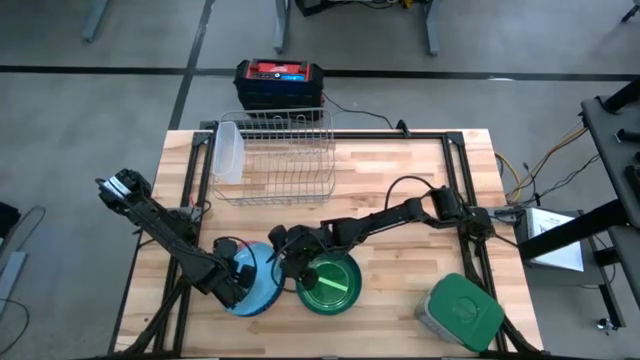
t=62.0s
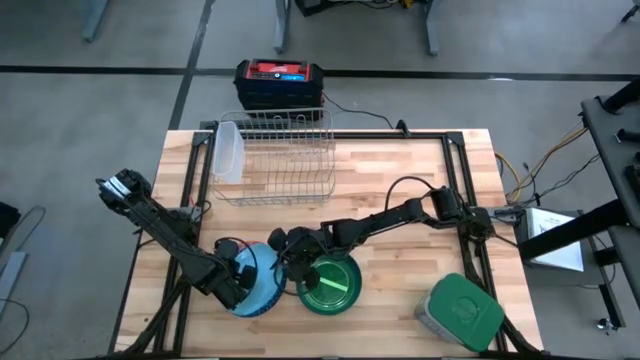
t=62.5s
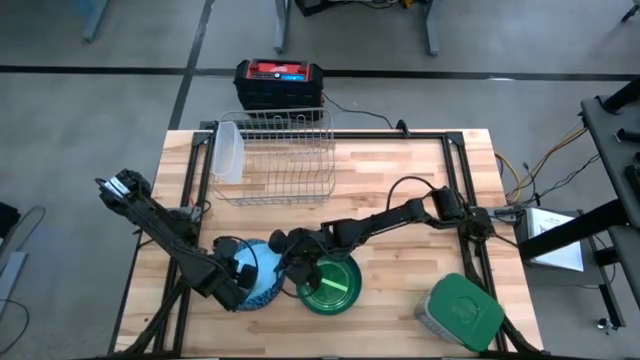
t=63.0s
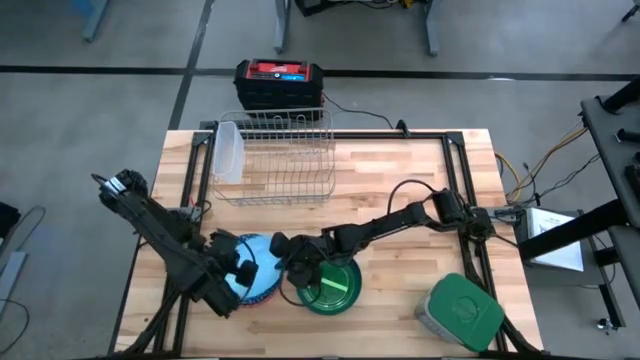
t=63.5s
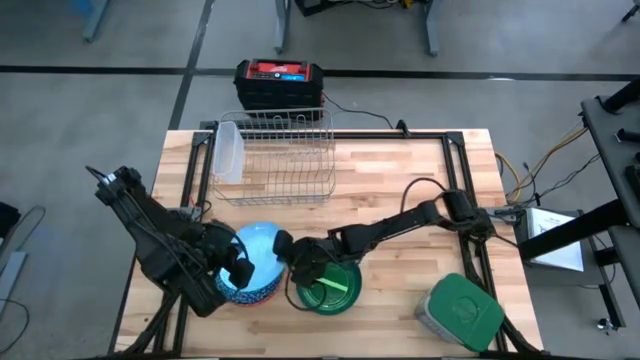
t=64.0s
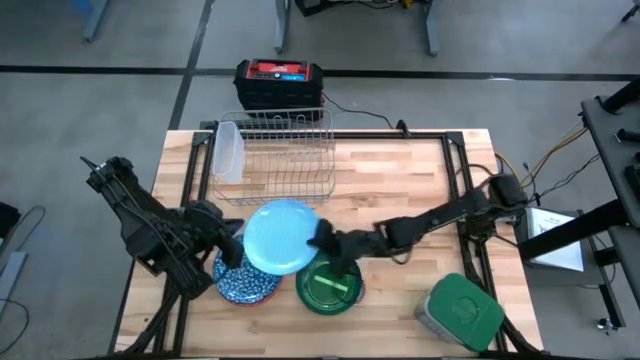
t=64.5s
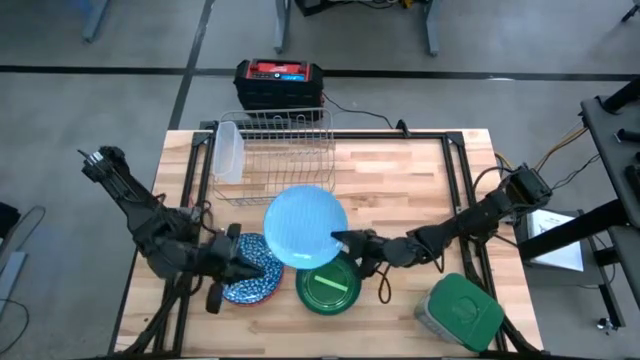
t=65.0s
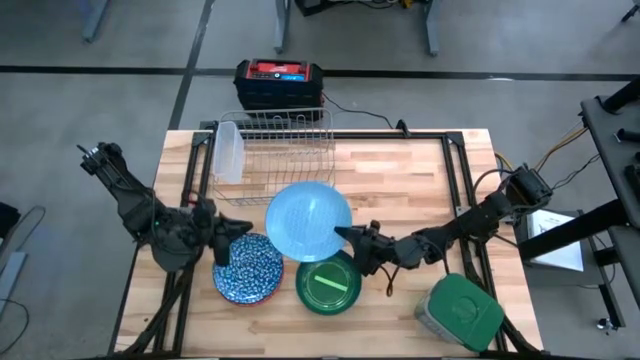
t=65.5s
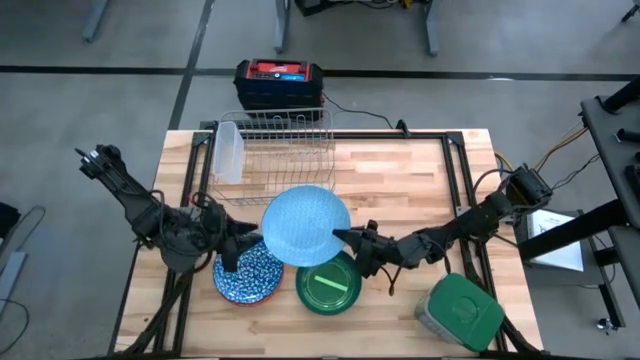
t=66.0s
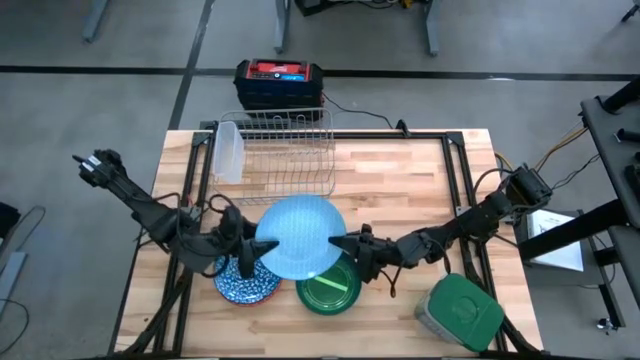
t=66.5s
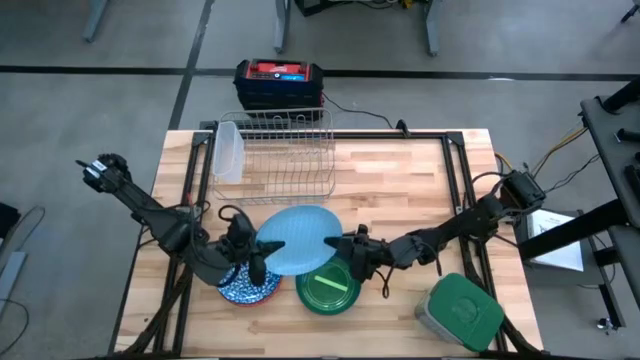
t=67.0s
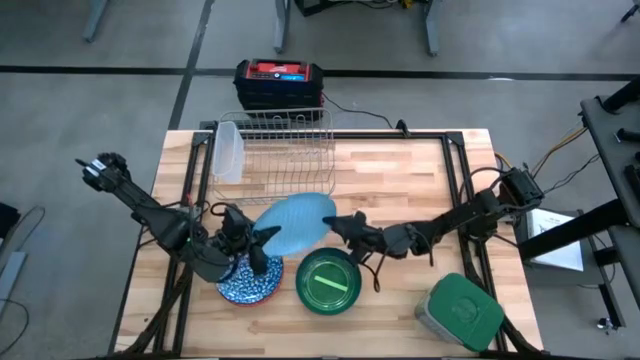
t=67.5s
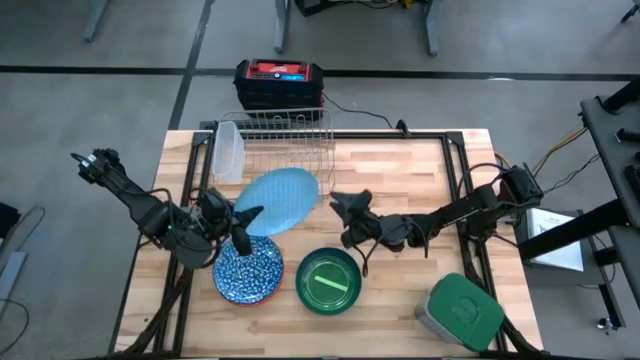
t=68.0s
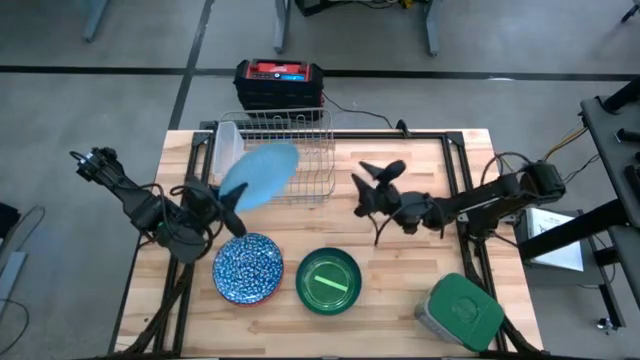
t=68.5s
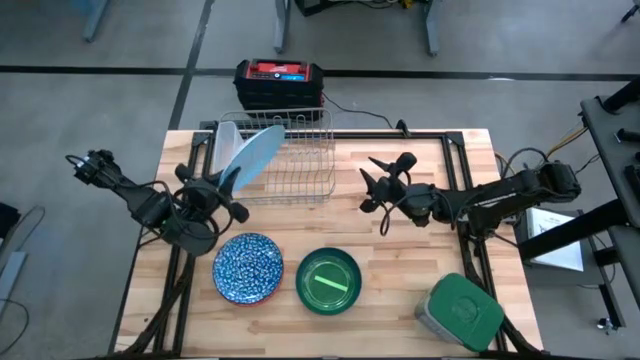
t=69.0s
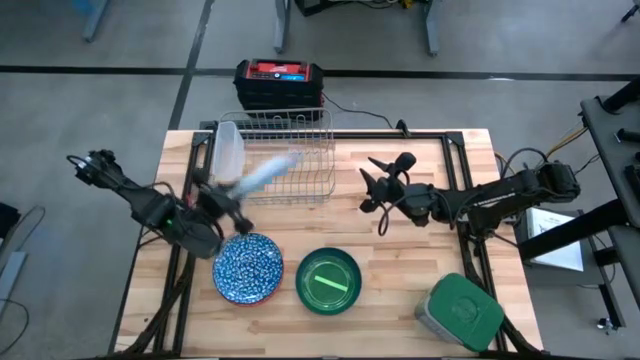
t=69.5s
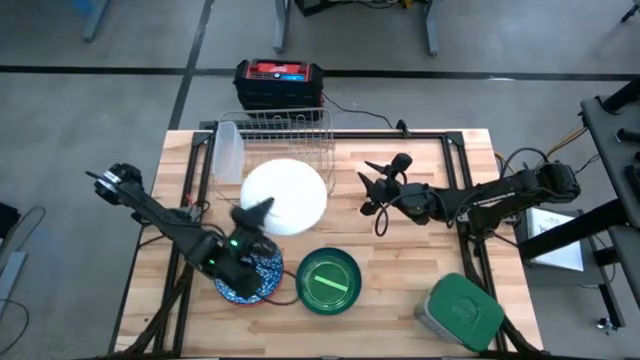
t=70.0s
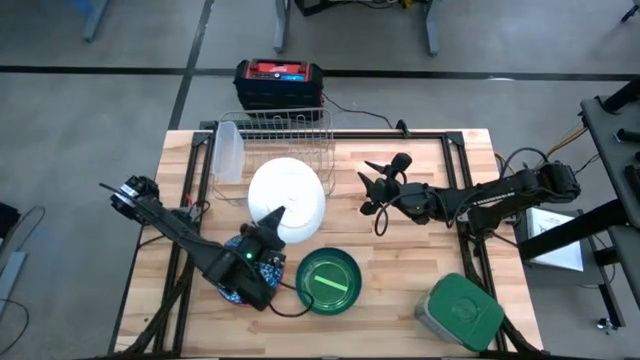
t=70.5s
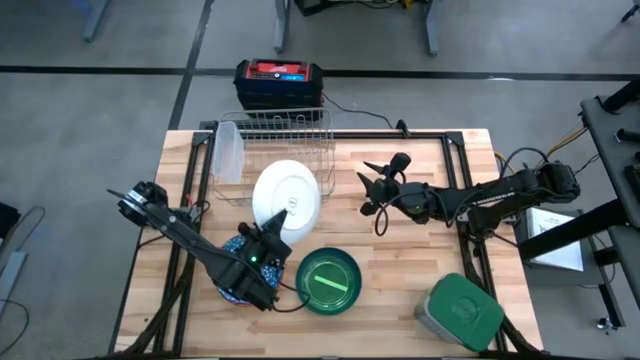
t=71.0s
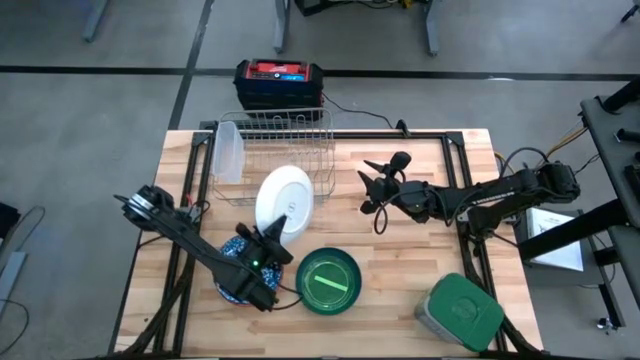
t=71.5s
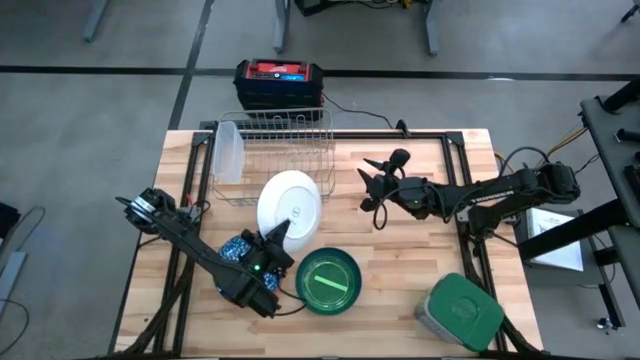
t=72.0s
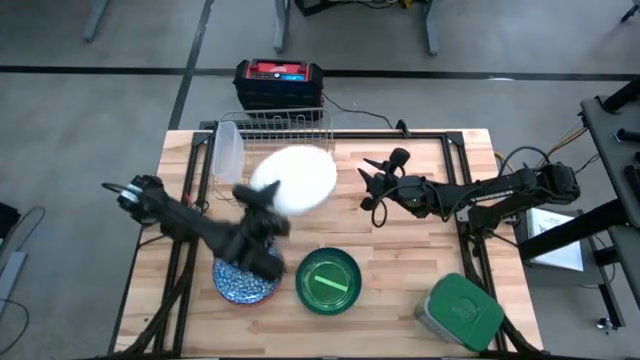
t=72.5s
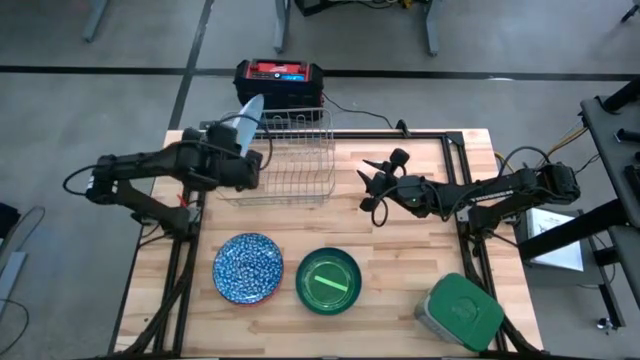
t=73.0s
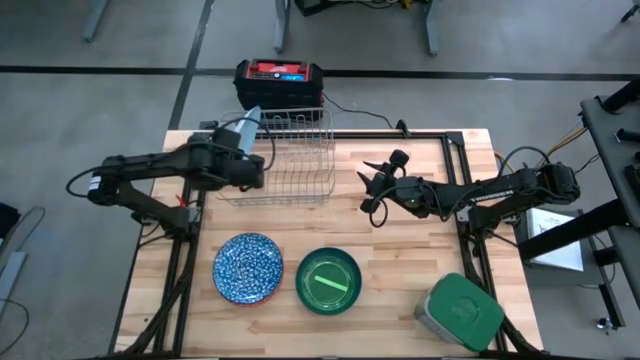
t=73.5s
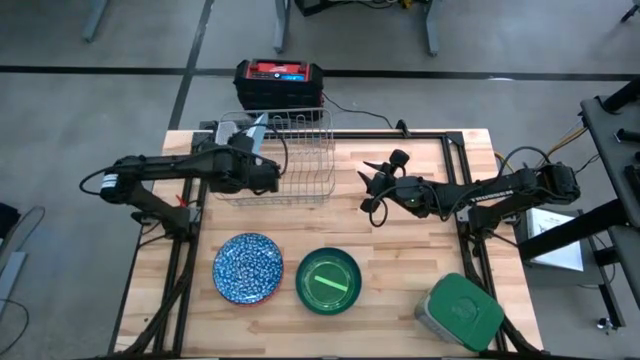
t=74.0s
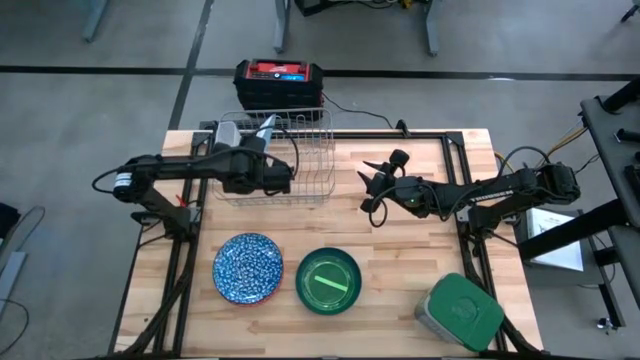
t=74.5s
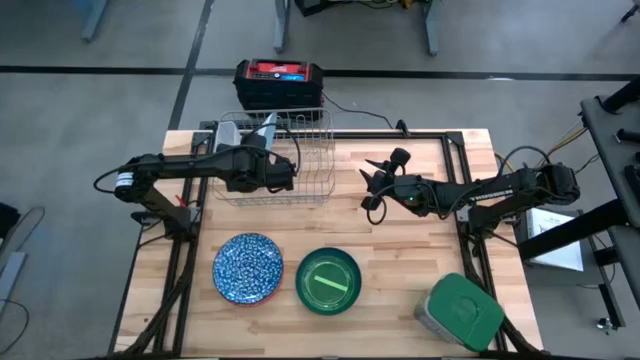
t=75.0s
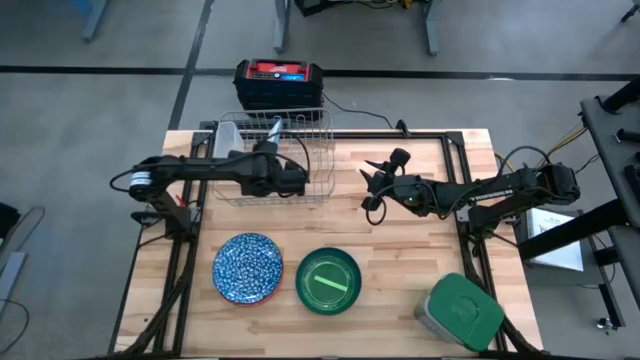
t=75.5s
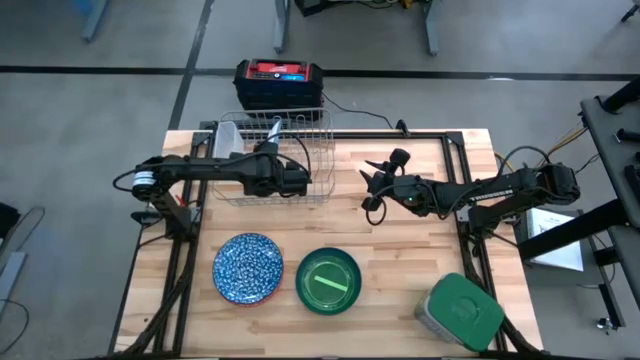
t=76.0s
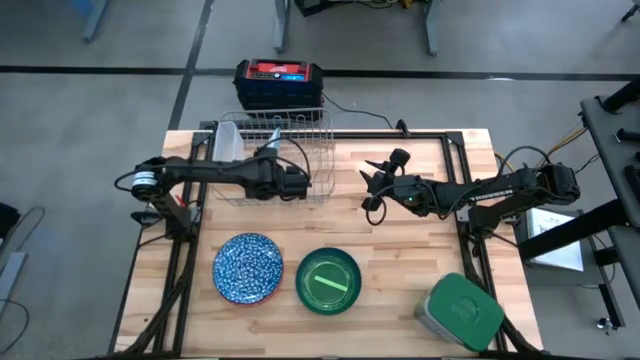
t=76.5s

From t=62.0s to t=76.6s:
Task: Sort dishes
Put the light blue patterned plate into the dish rack

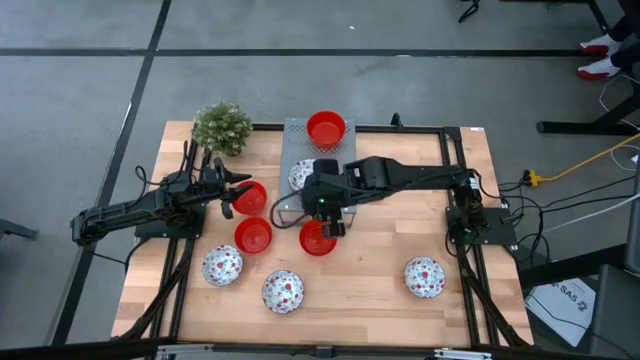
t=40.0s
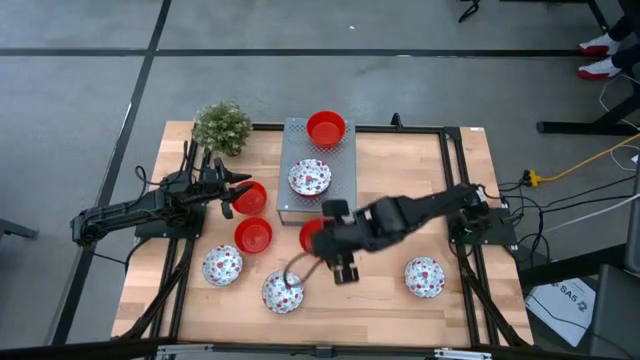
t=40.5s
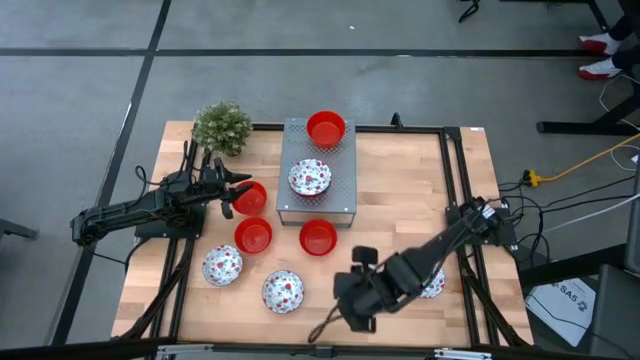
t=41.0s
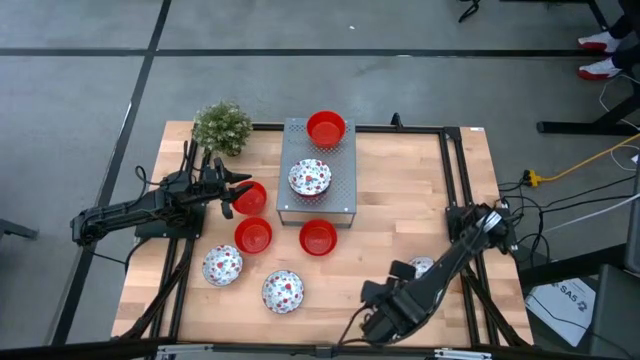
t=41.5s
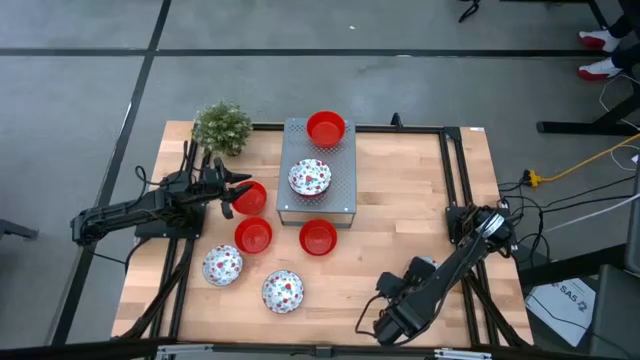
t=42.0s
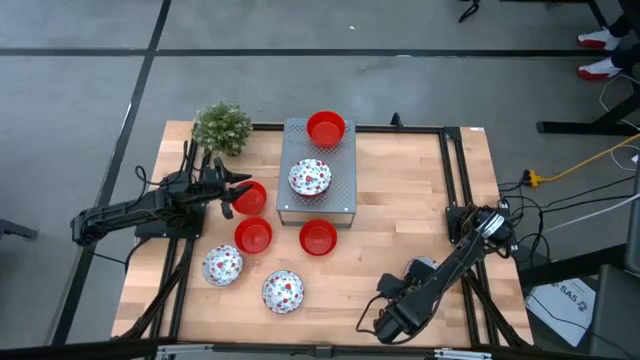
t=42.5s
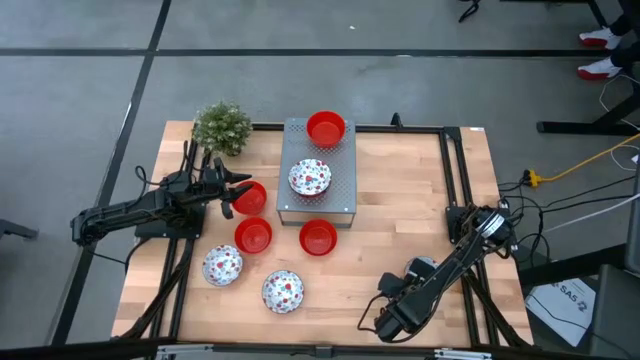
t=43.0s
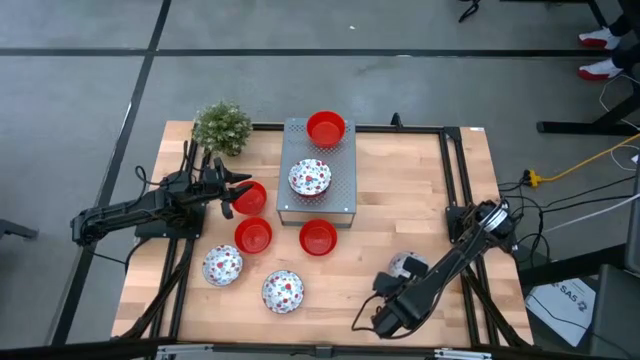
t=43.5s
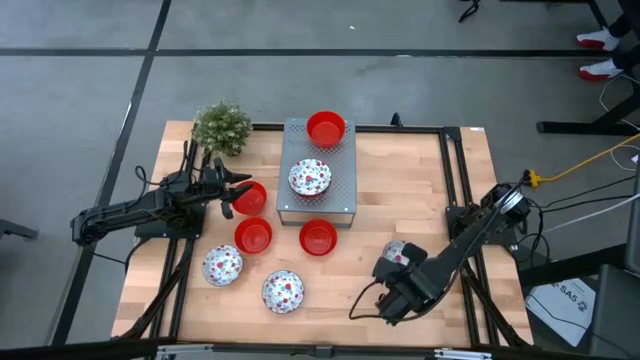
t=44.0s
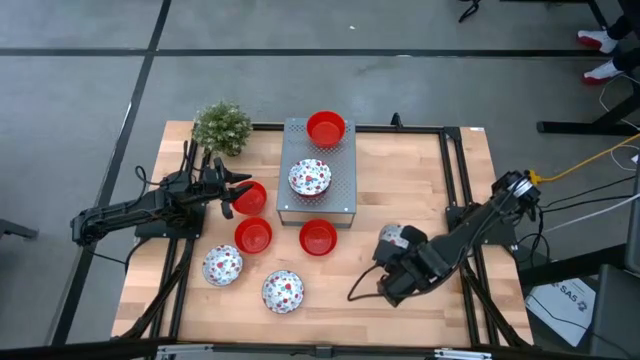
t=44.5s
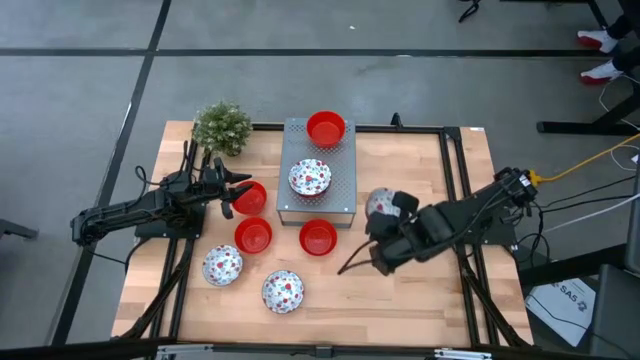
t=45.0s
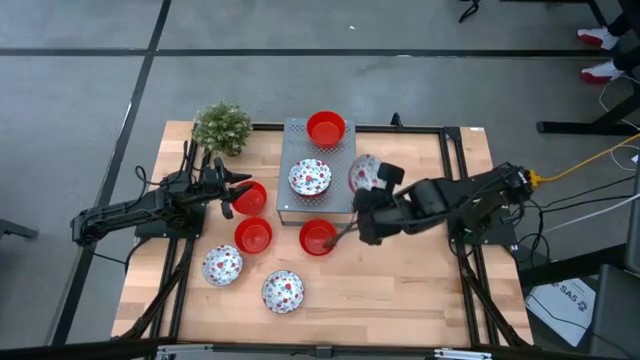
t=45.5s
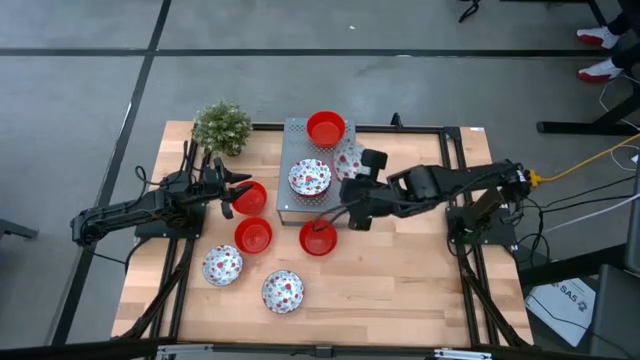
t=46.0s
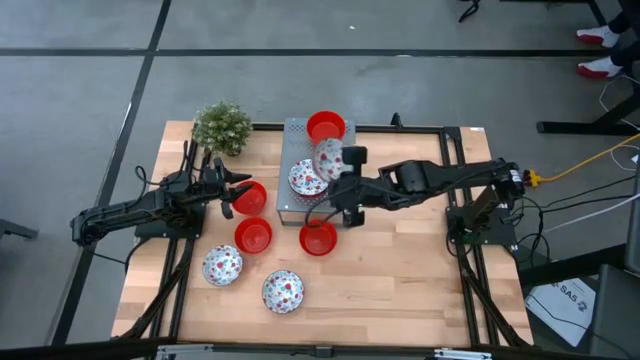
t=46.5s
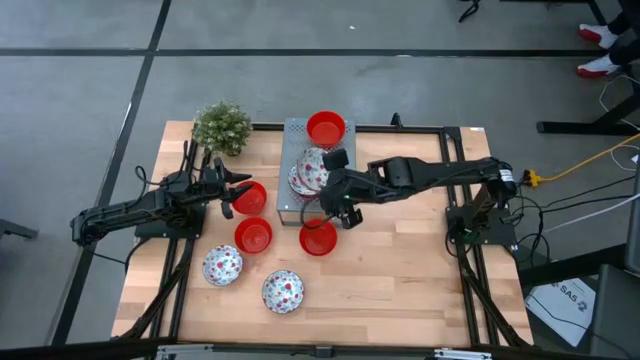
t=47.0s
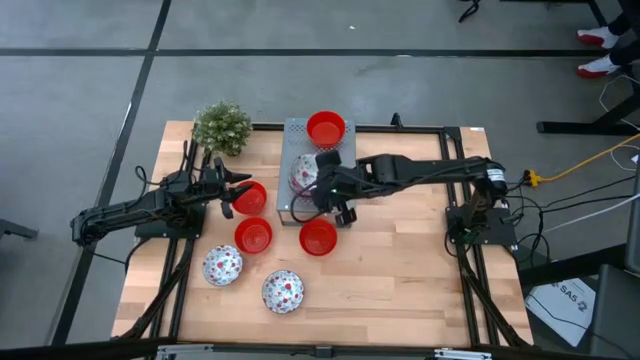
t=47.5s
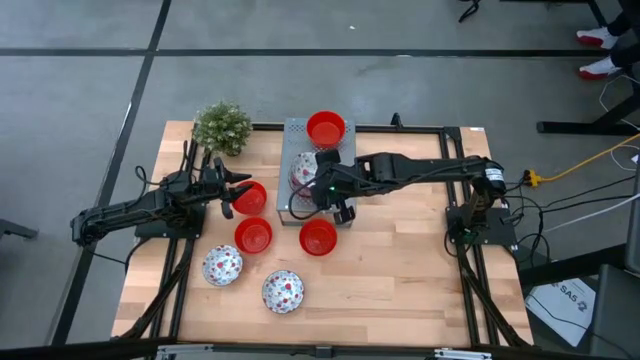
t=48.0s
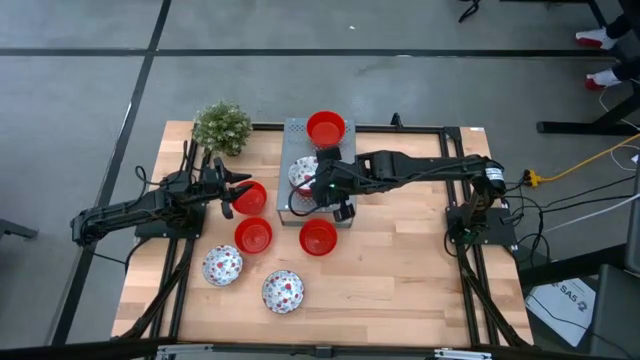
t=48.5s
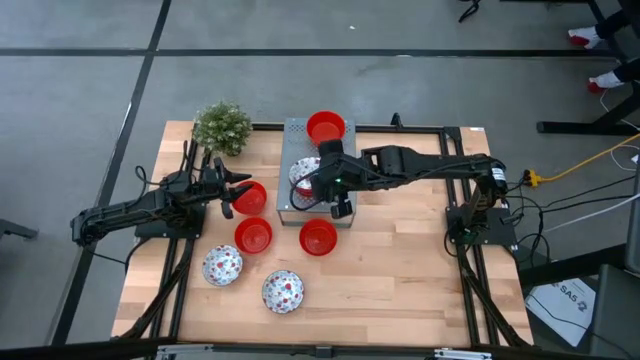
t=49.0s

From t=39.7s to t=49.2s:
Task: Pick & Place Mini bowls
Stack the white patterned bowl on the white patterned bowl on the shelf
